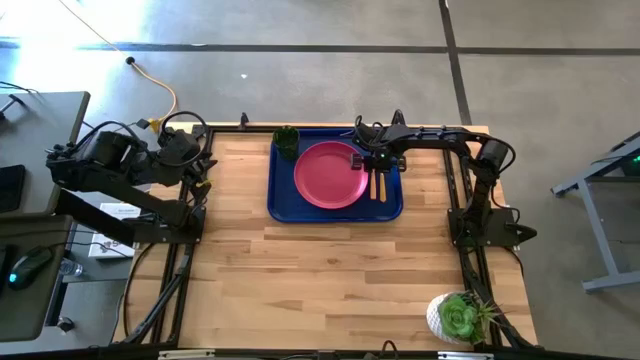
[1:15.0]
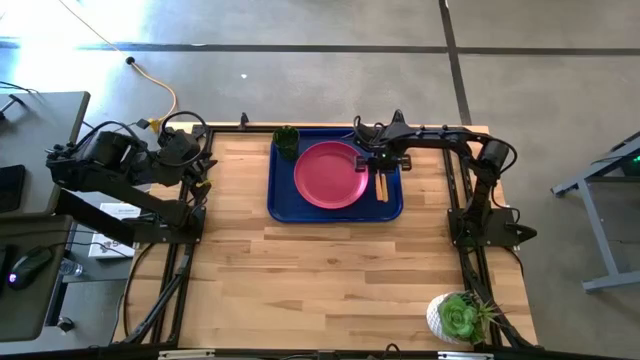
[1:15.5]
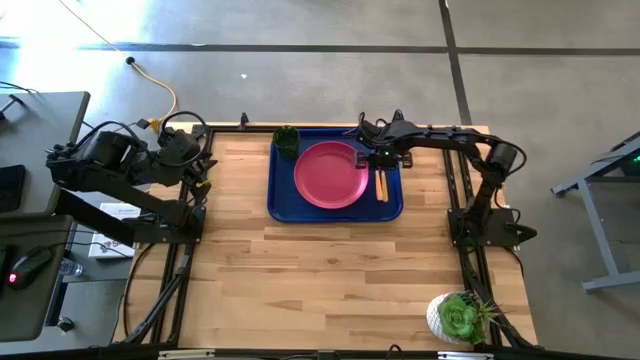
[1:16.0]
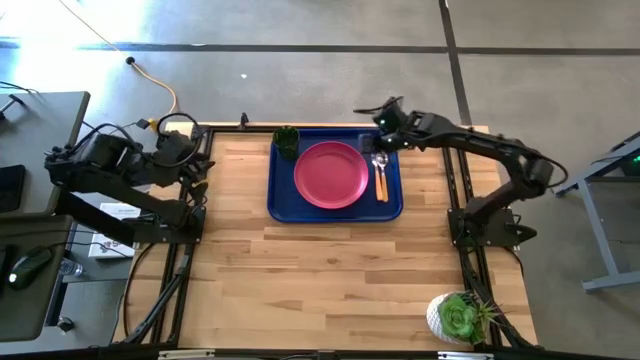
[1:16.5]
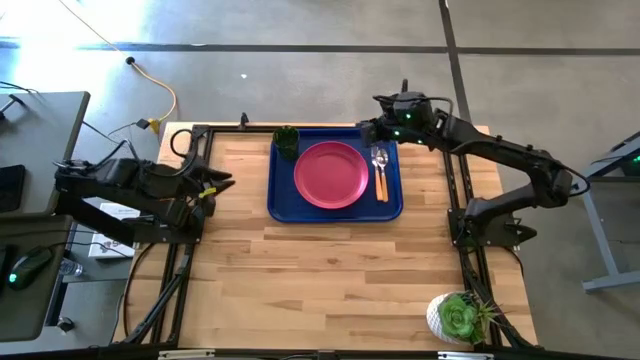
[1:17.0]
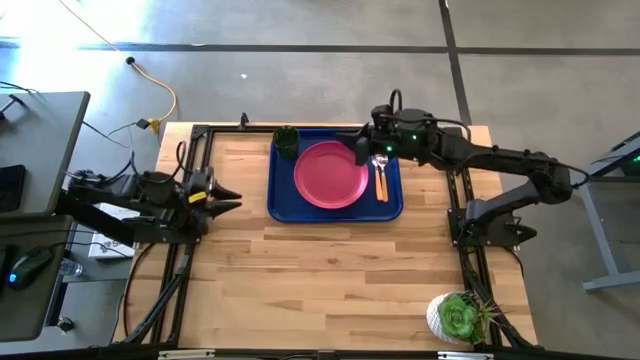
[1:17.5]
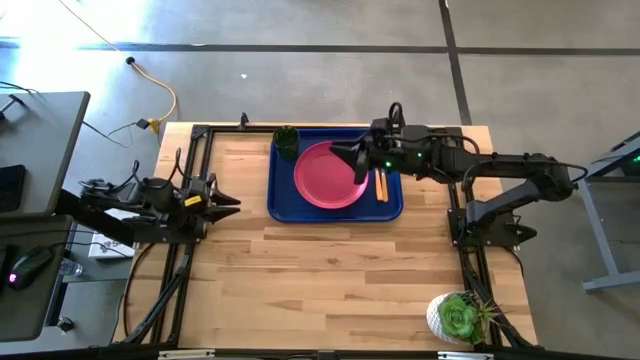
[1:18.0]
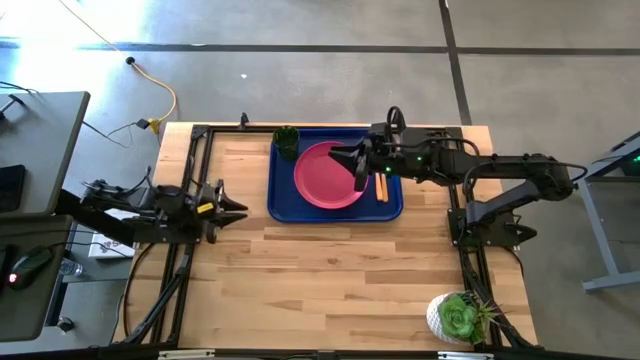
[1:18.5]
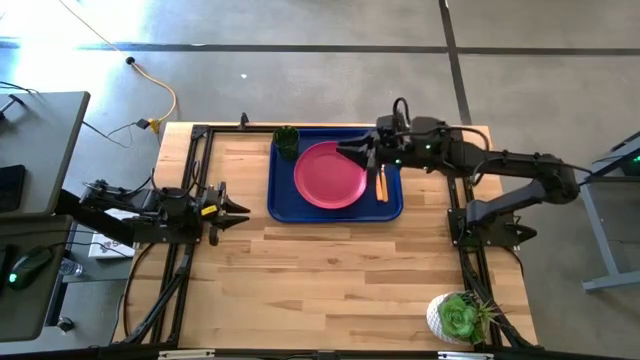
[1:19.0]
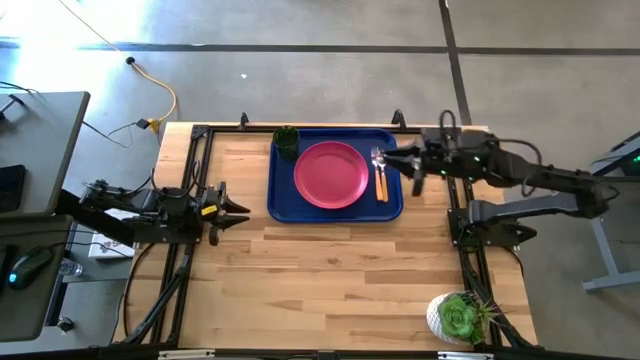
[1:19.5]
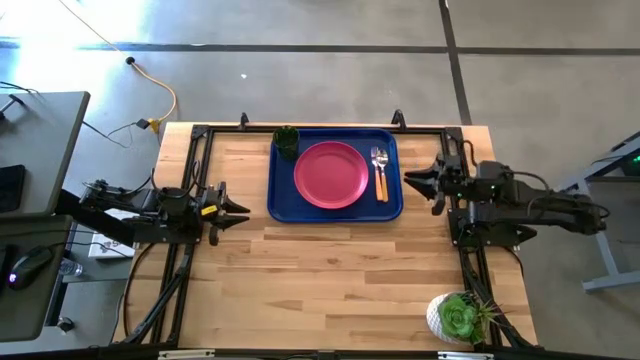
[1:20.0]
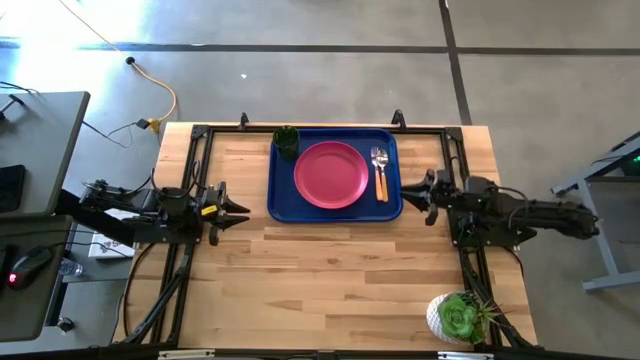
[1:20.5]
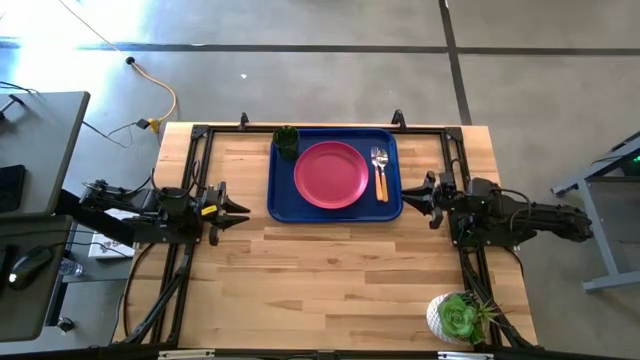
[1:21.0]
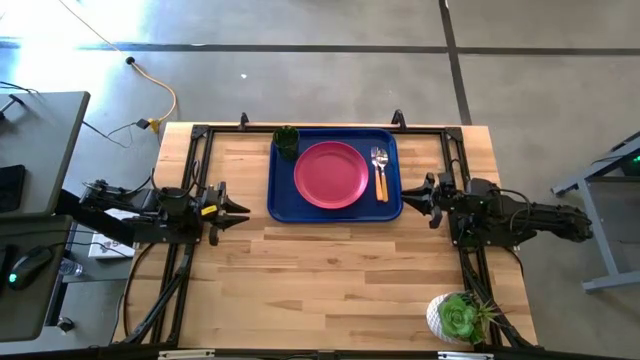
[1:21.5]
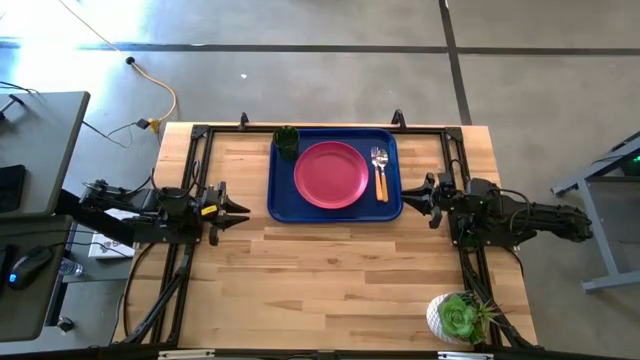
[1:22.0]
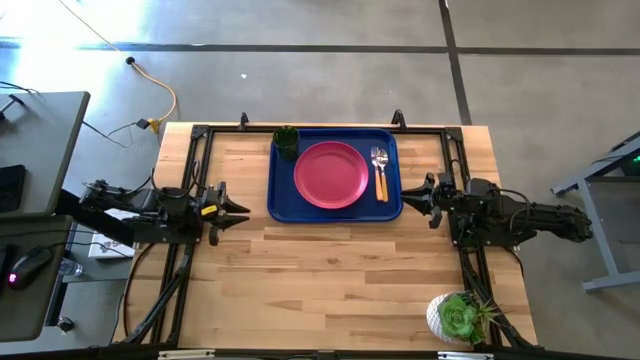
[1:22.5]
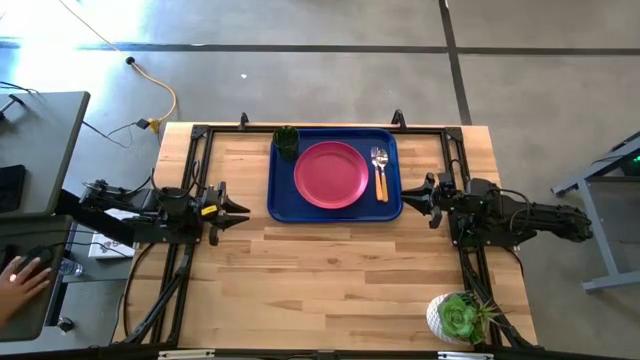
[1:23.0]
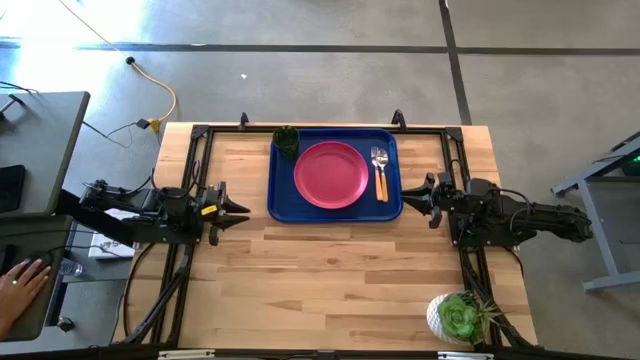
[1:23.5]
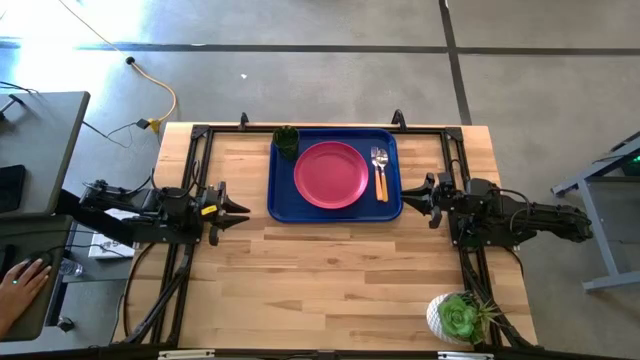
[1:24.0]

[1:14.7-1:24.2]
Task: Pick and place plate/cup/fork/spoon on tray
Return to Home Position

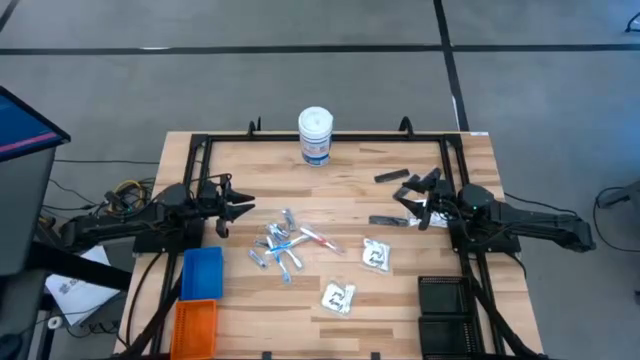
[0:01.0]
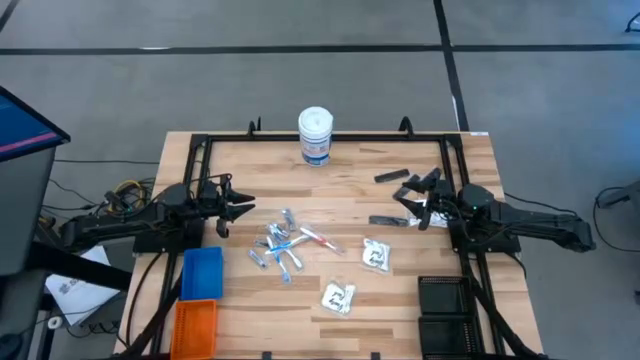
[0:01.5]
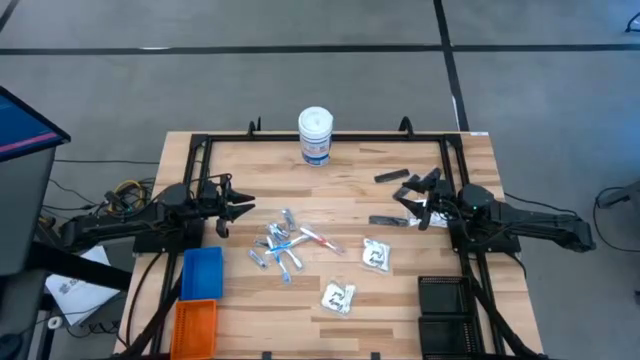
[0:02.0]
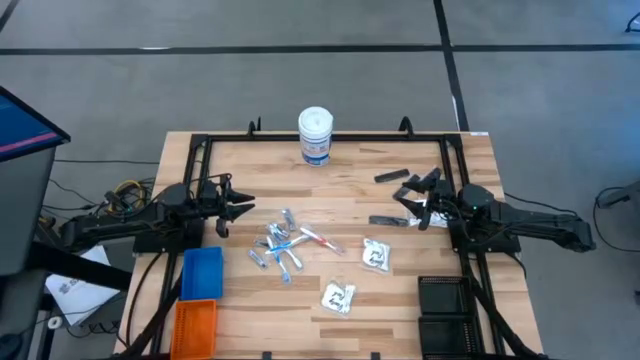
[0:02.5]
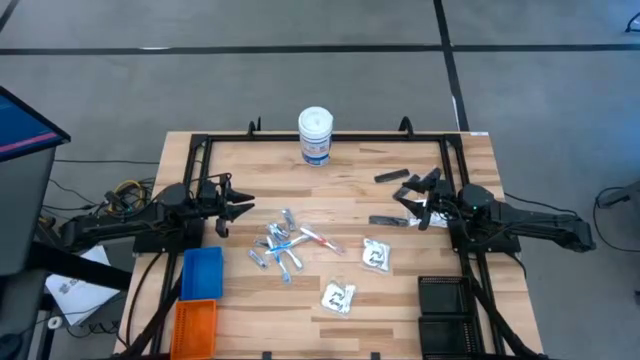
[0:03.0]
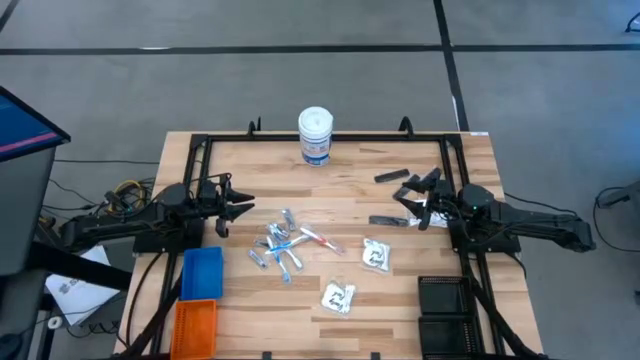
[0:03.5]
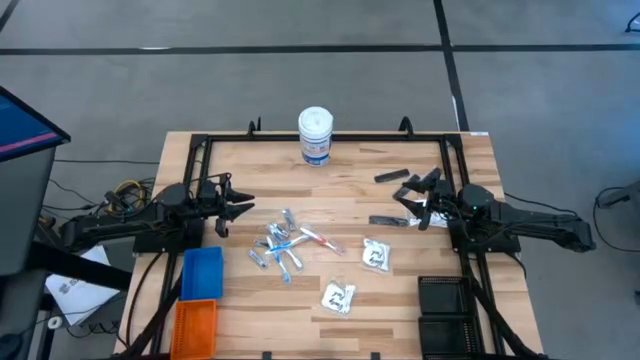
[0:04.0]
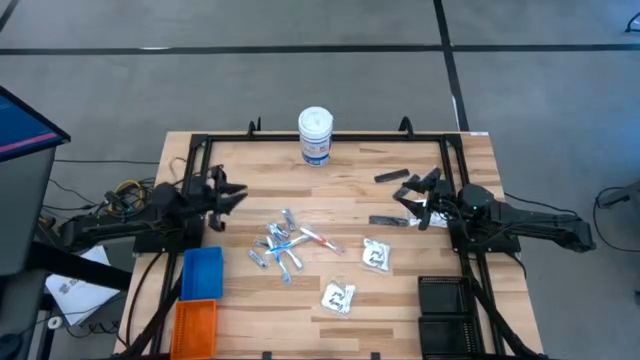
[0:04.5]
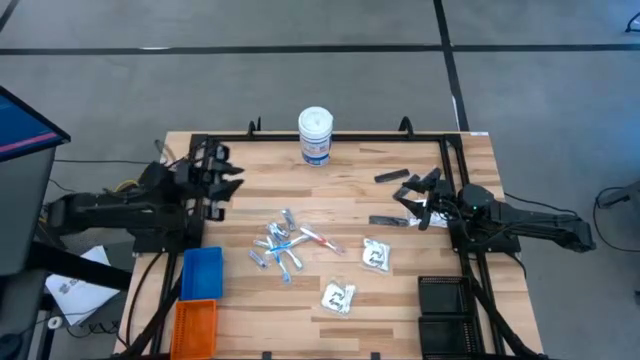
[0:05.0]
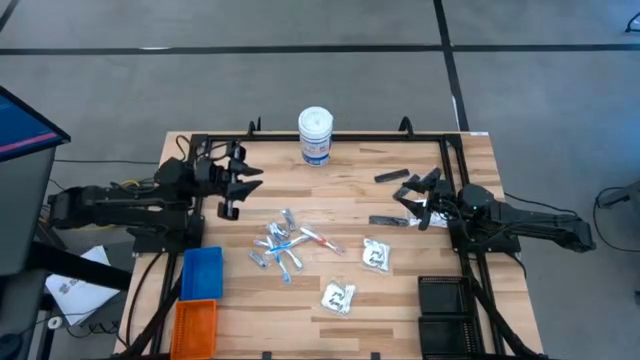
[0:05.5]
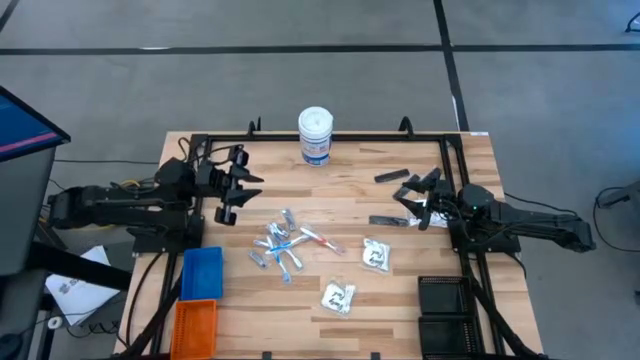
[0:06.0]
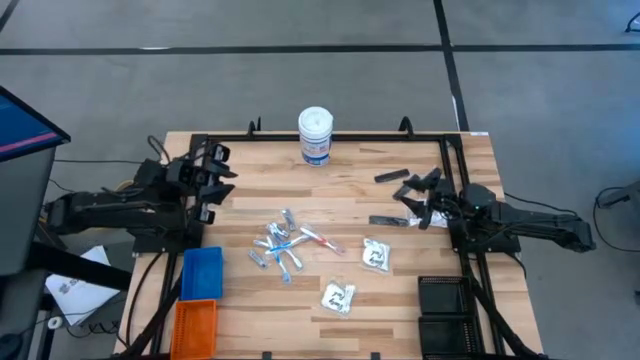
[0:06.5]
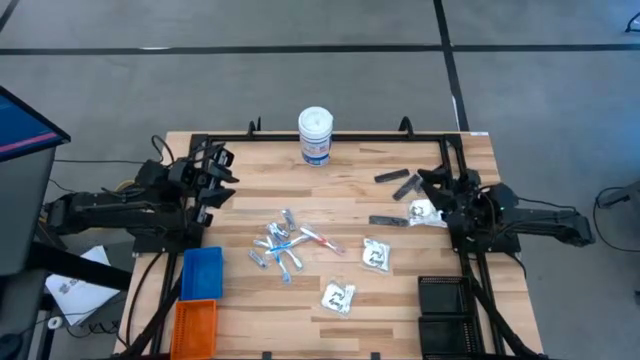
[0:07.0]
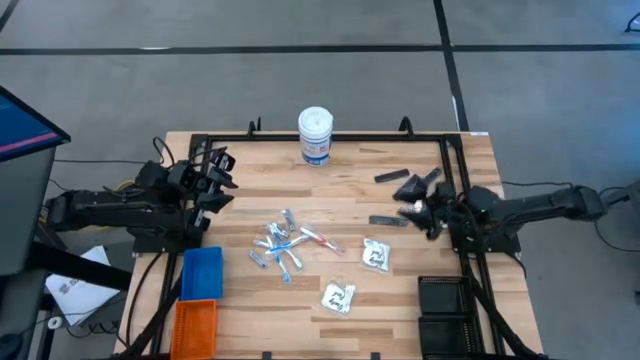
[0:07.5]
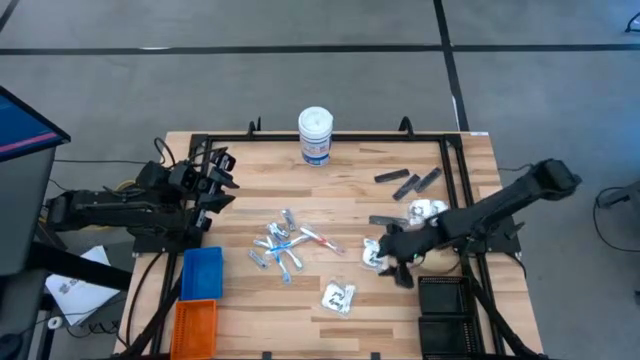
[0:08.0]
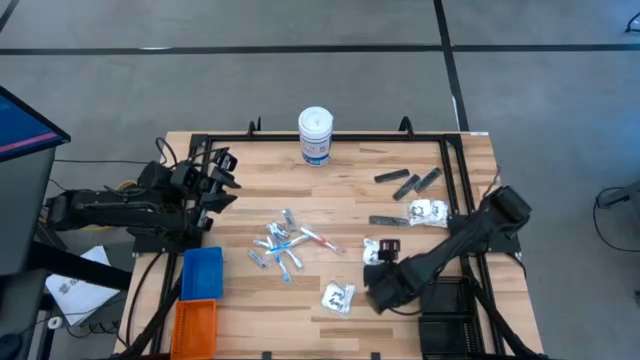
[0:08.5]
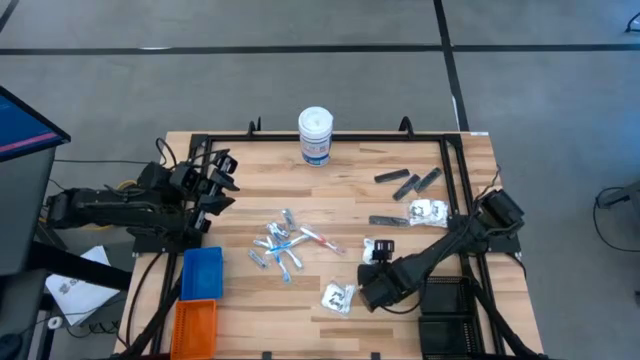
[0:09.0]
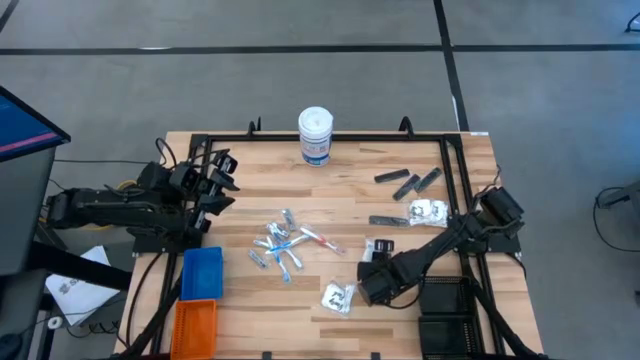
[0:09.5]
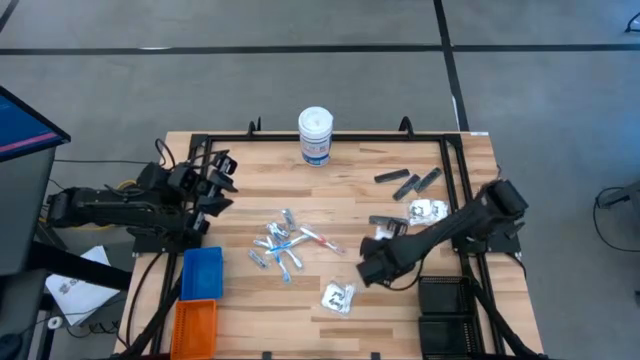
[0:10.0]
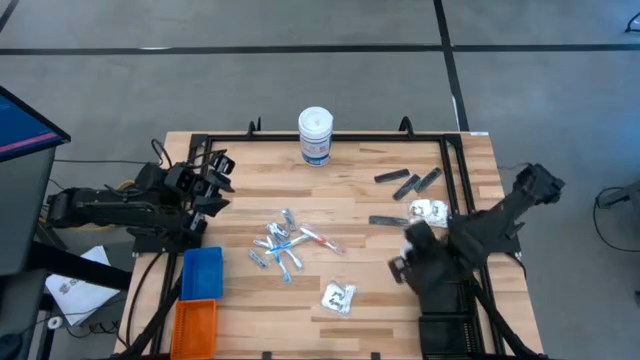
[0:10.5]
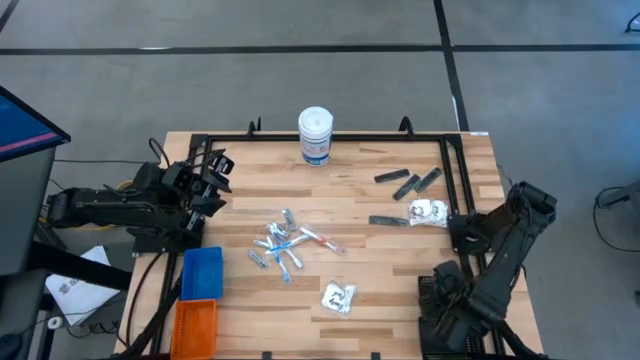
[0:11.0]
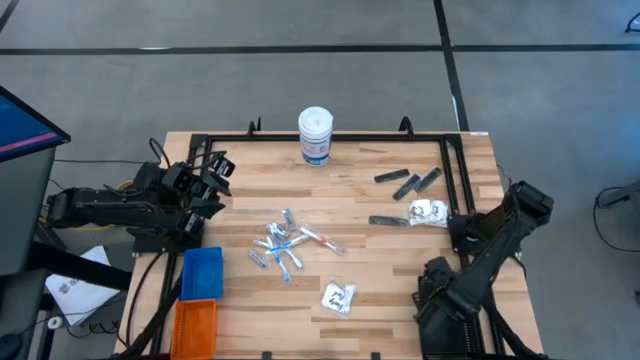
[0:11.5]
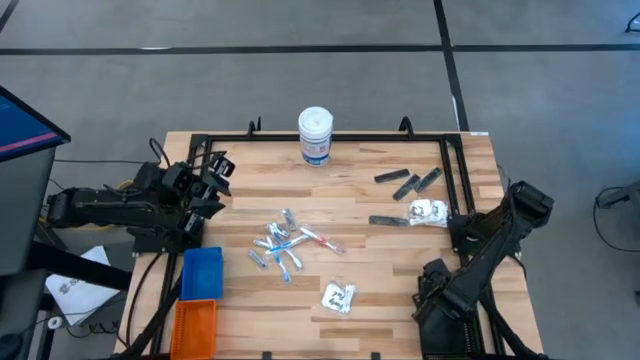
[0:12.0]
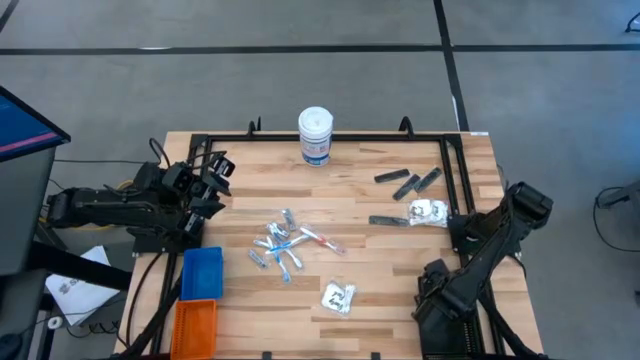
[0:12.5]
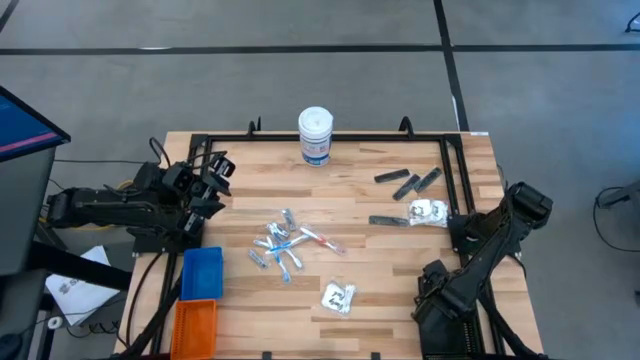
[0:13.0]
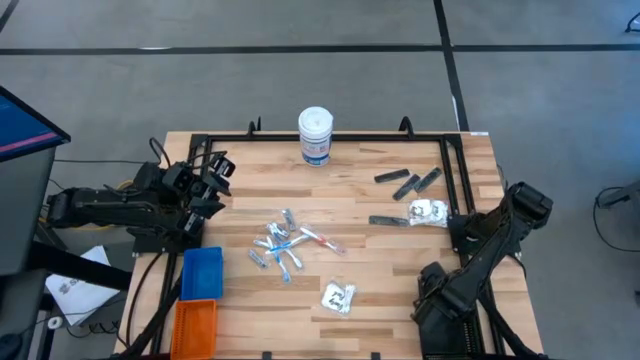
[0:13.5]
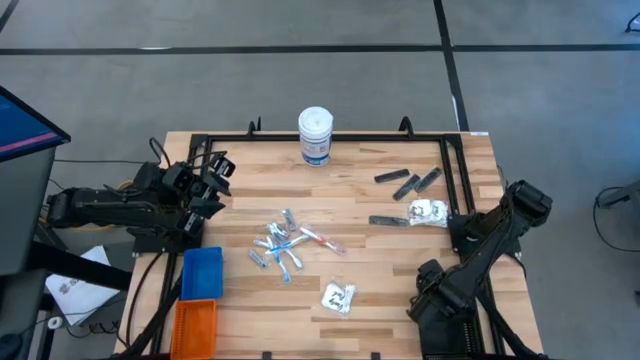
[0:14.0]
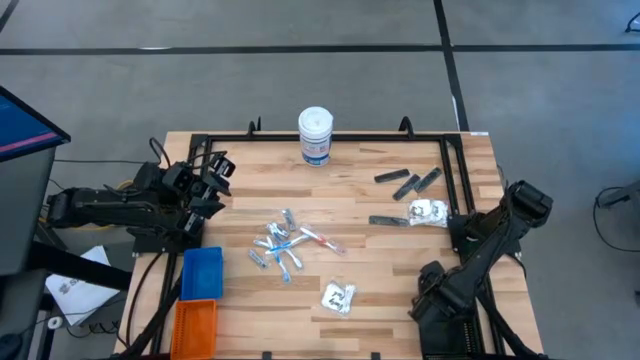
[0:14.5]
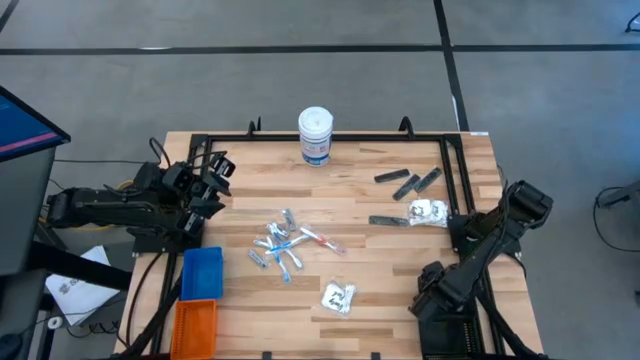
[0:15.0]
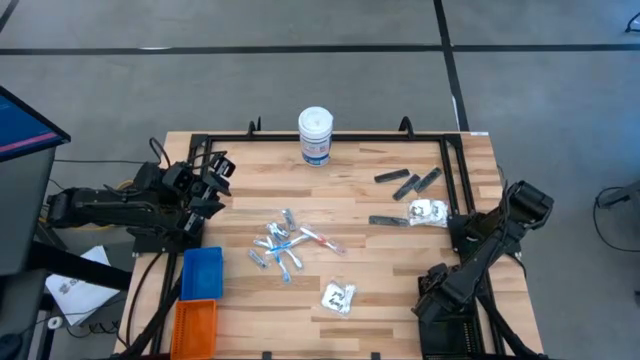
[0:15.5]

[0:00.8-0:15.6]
Task: Pick & Place Travel size toiletries
Put the white cotton swab pack into the top black bin
